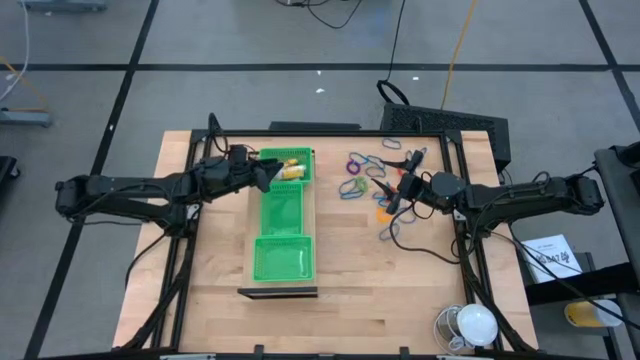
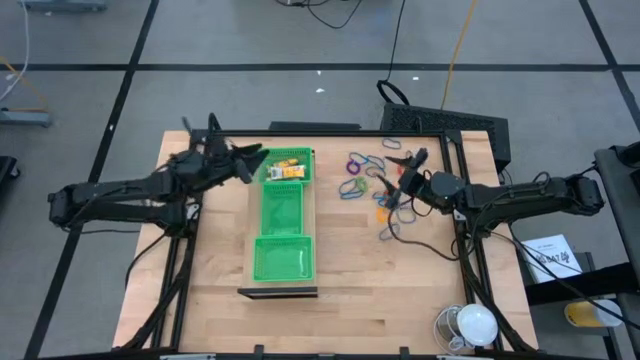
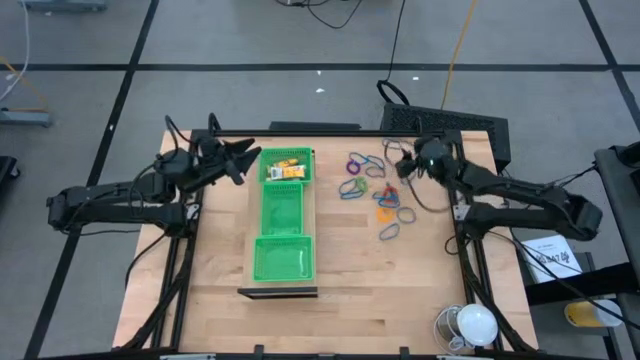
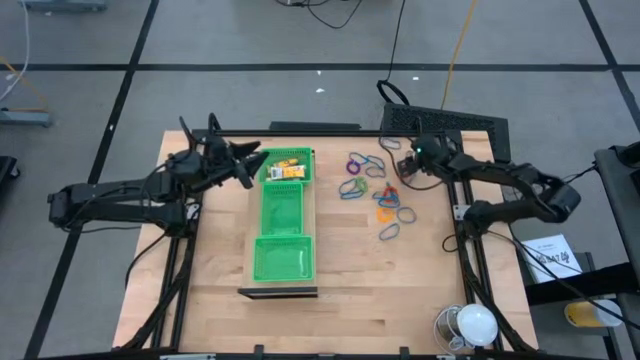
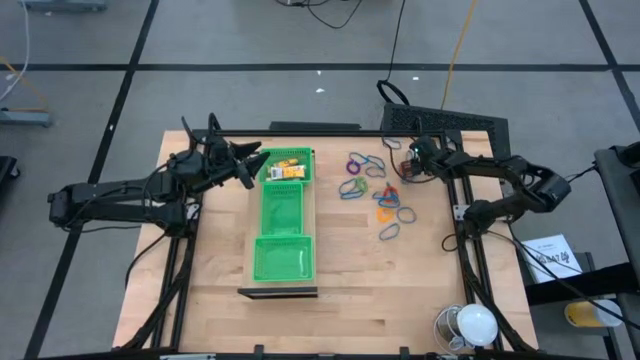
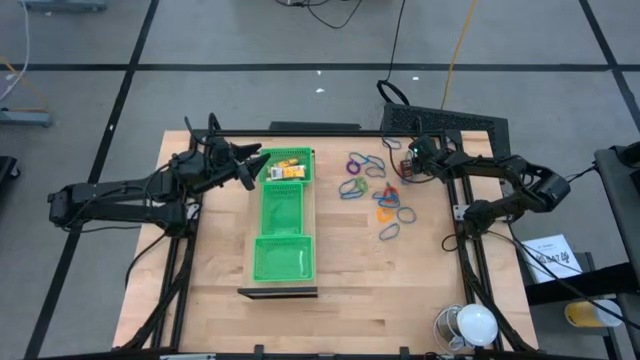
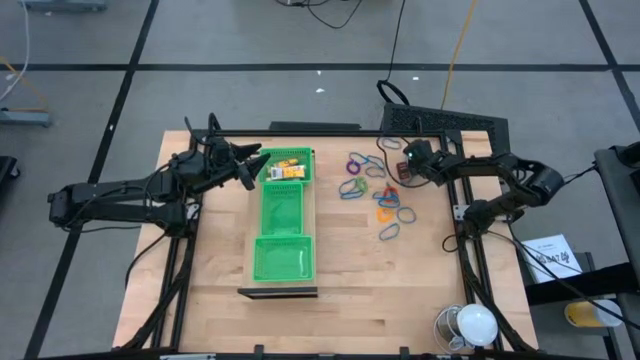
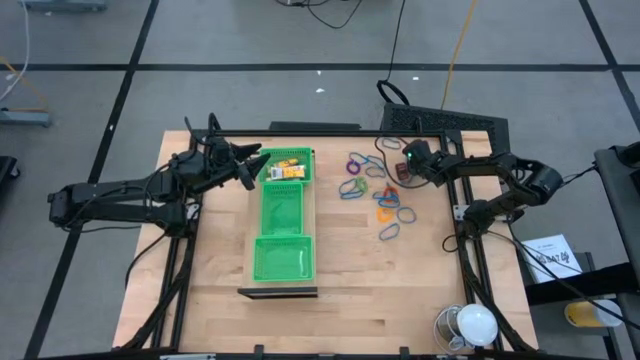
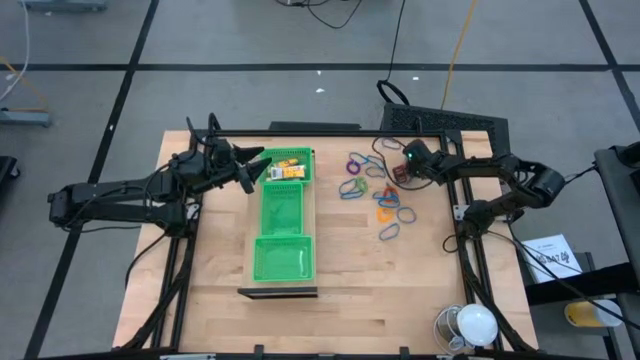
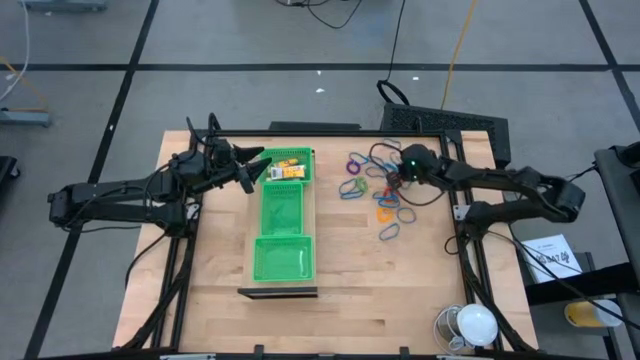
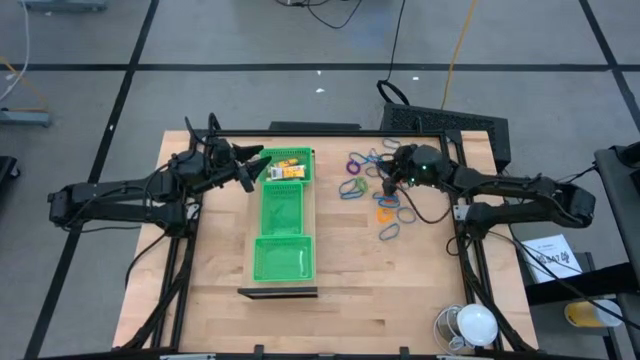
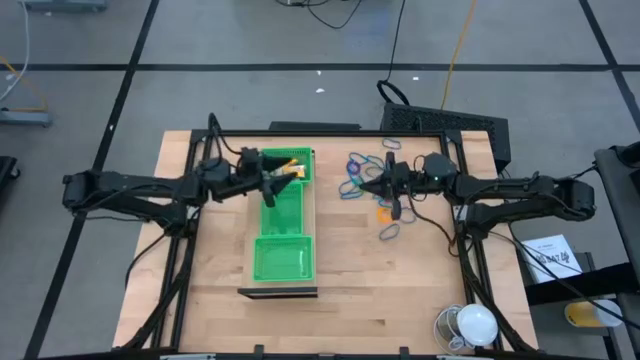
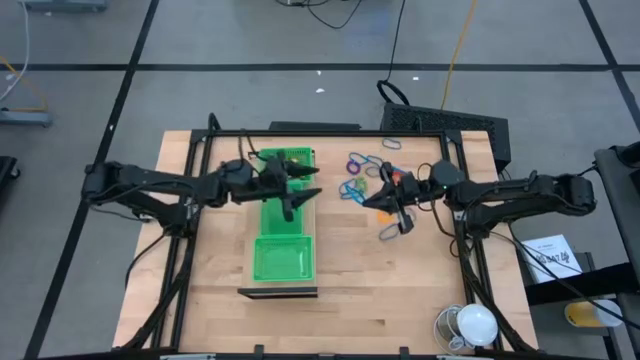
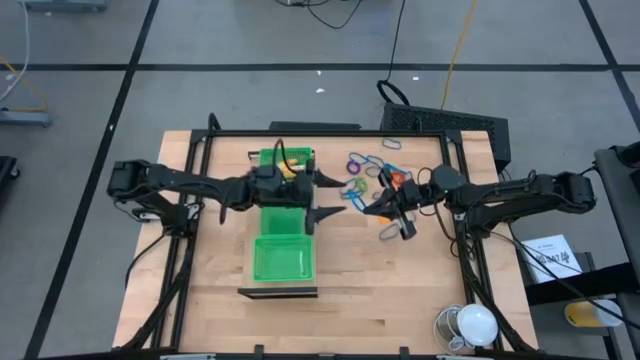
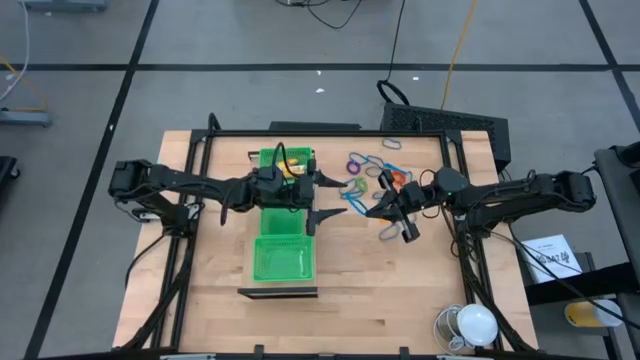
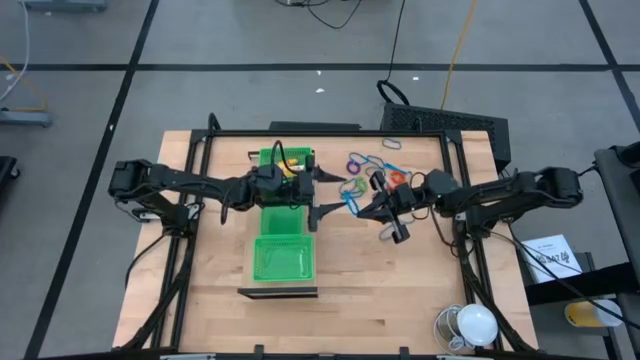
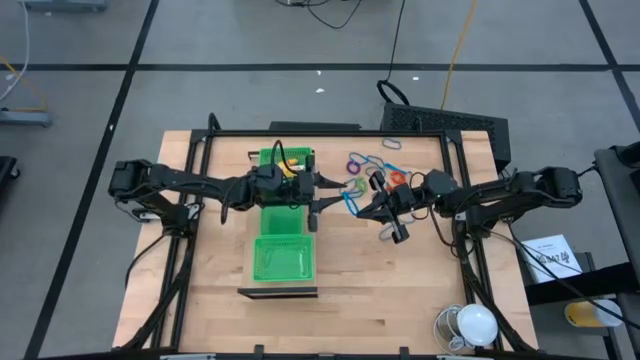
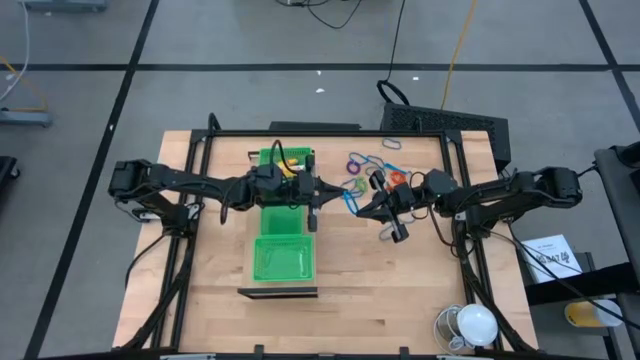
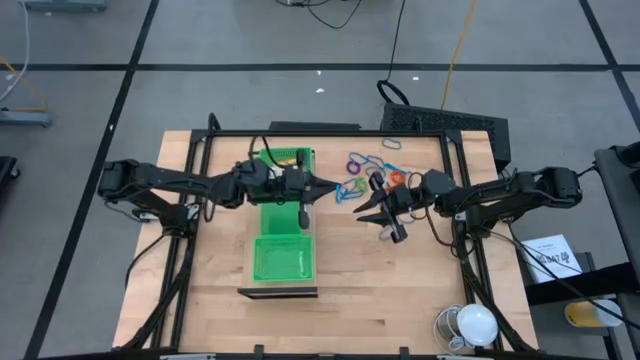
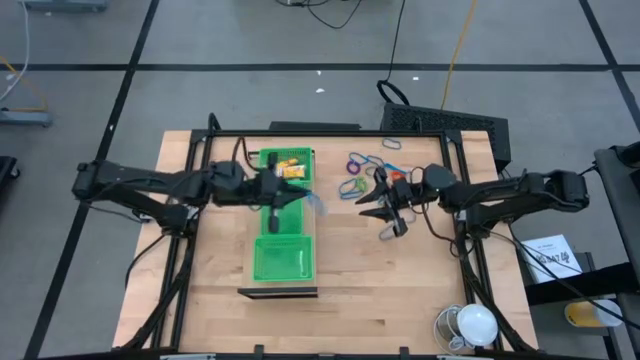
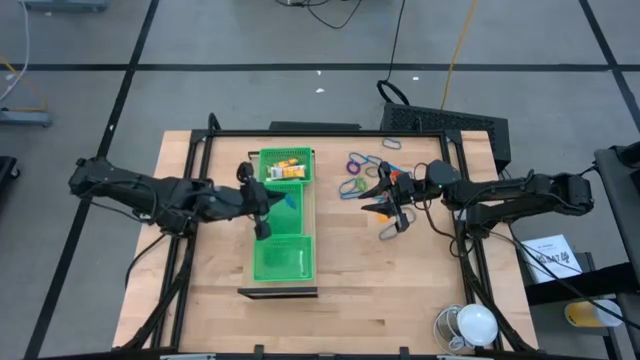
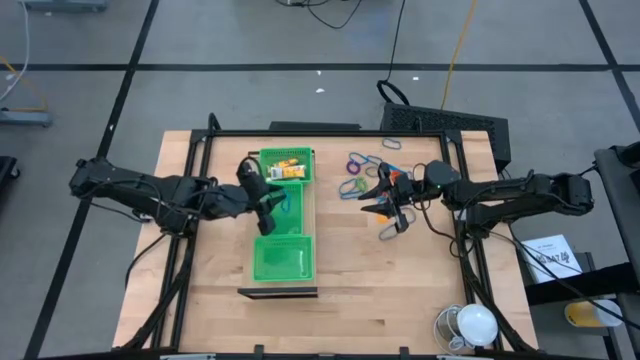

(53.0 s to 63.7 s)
Task: Pick & Place Office Desk Supplies
Put the blue rubber band into the center green bin on the shelf

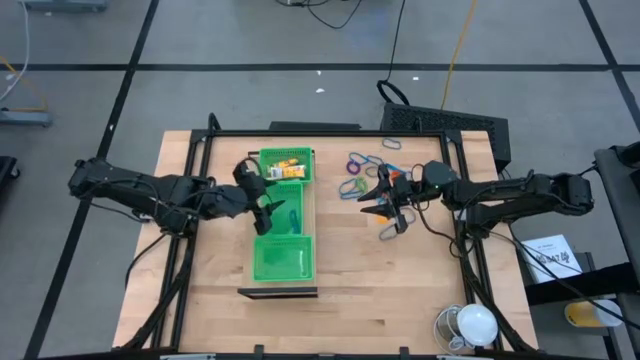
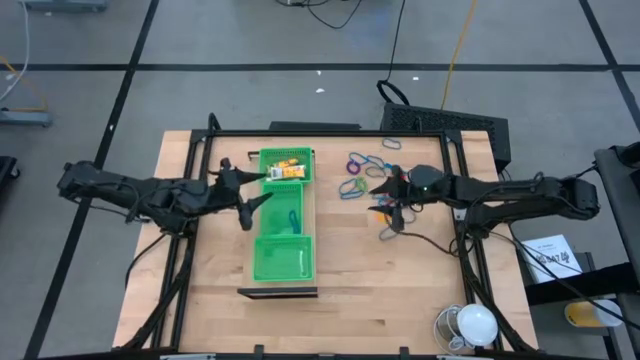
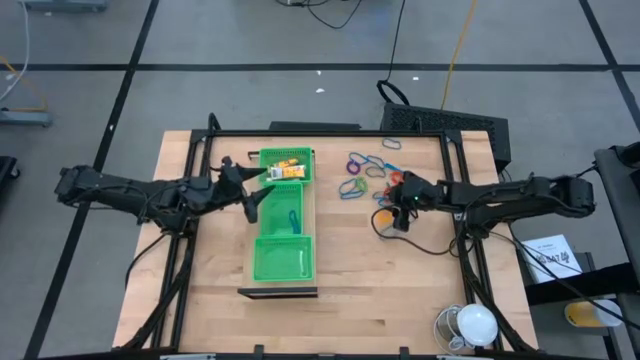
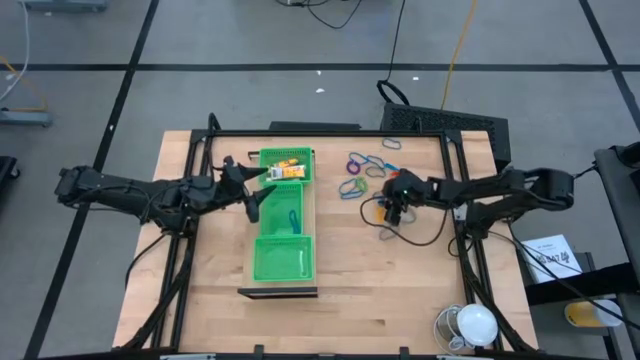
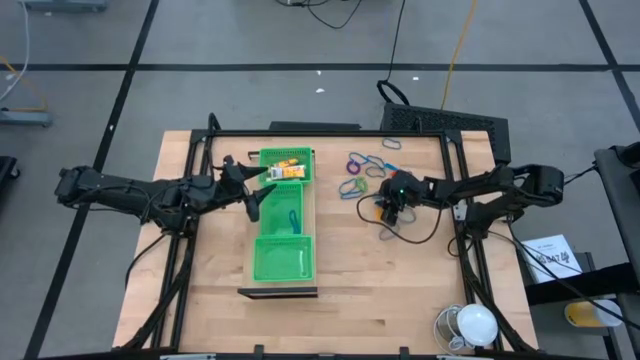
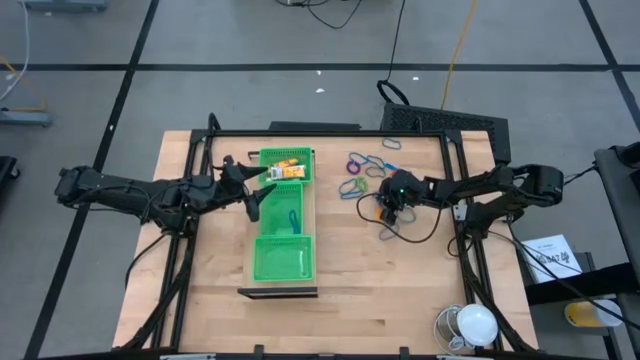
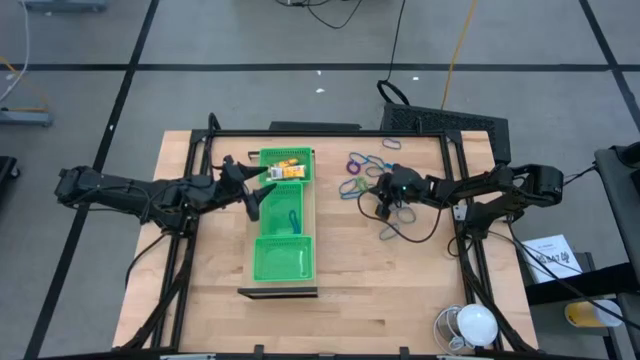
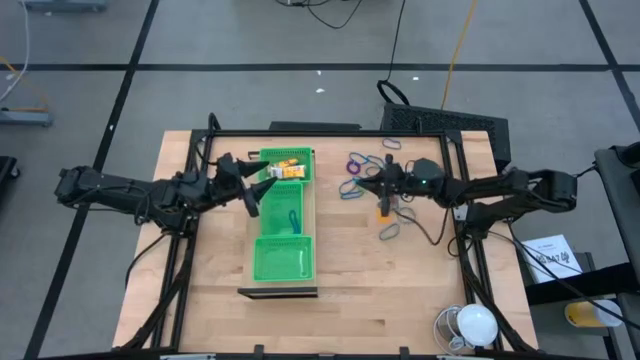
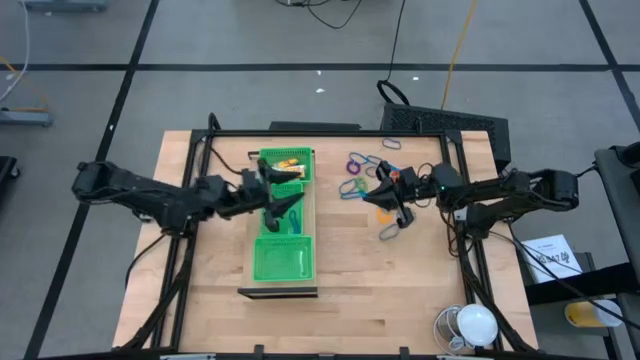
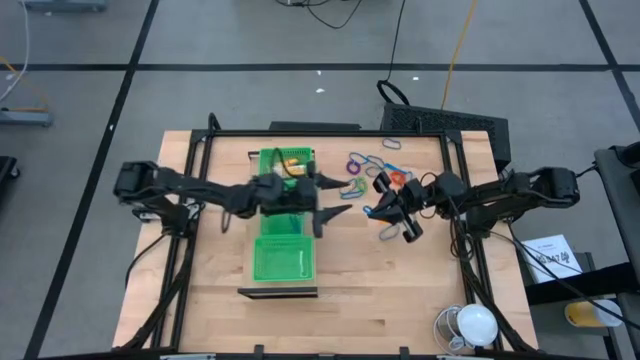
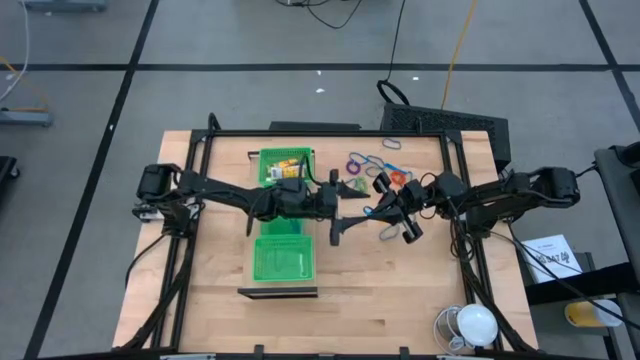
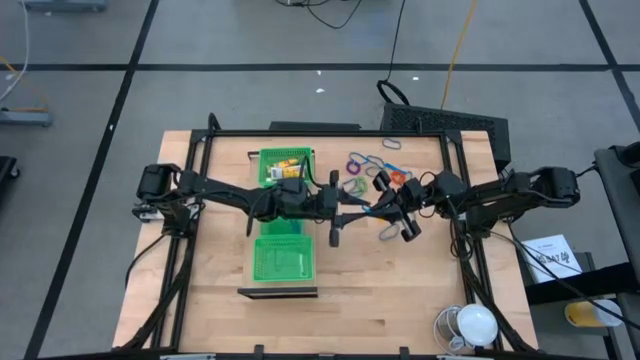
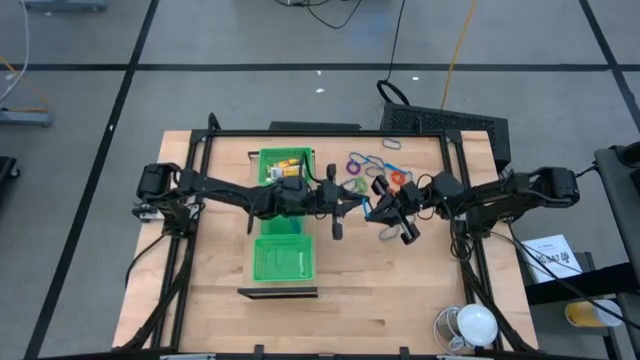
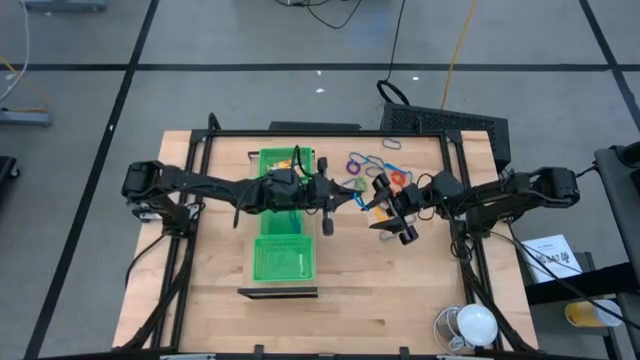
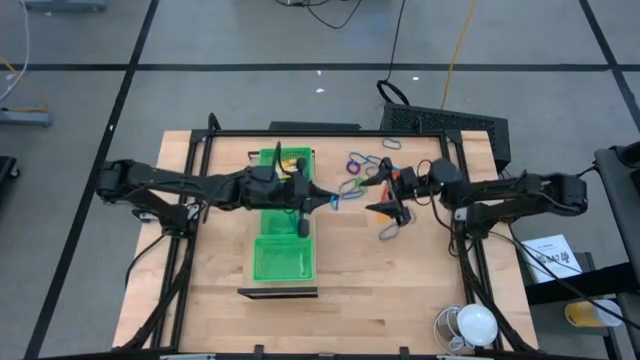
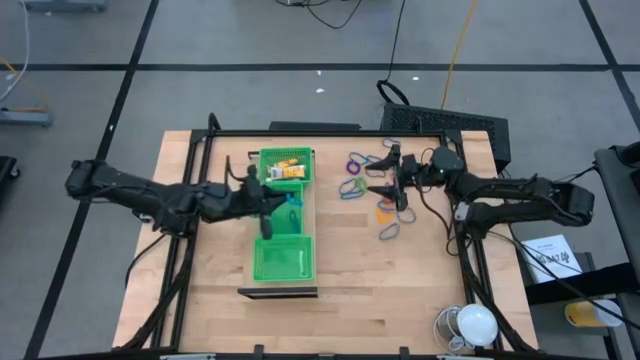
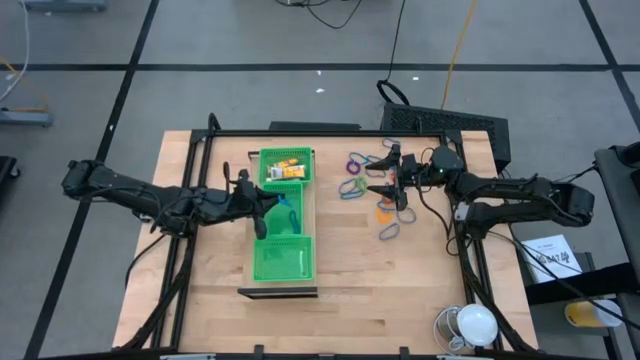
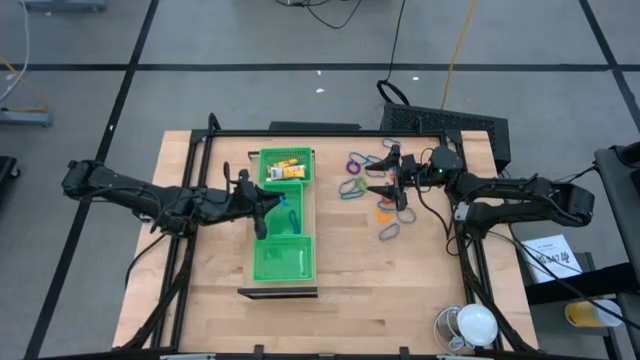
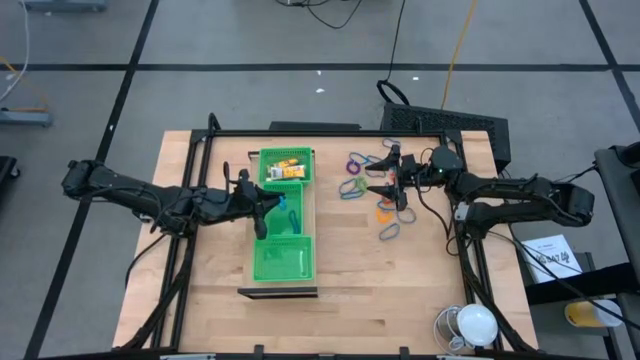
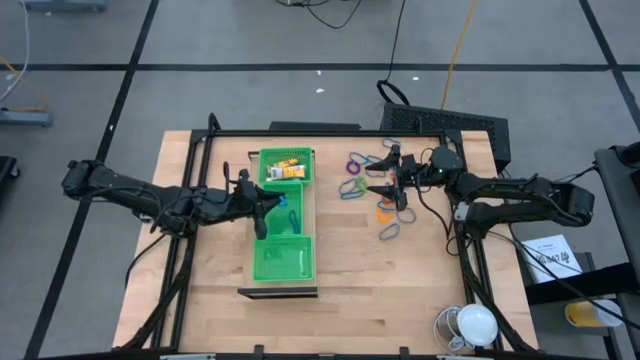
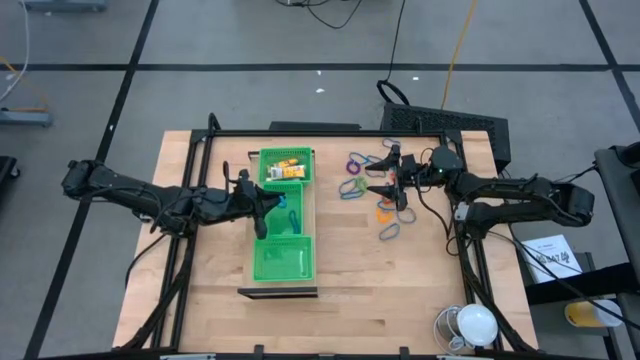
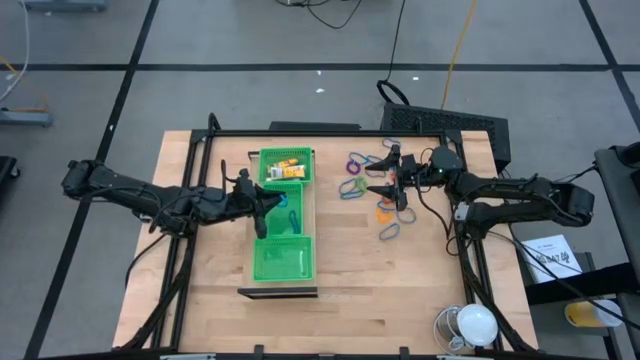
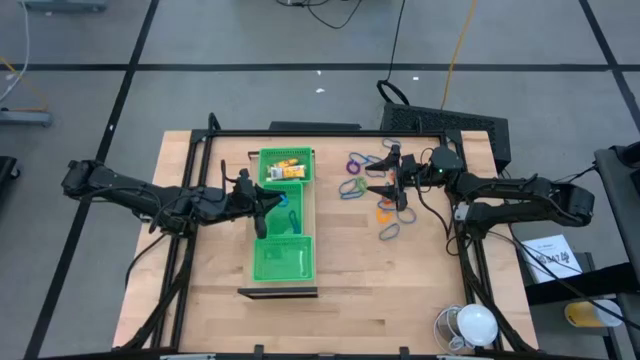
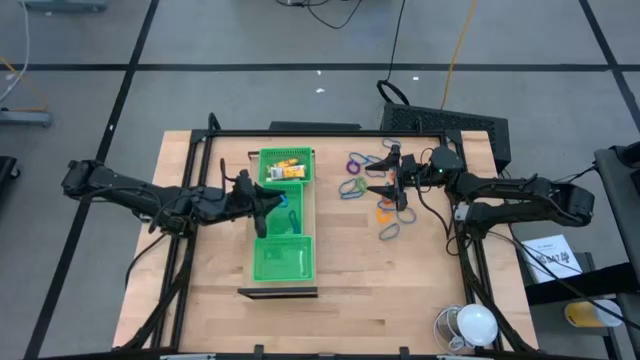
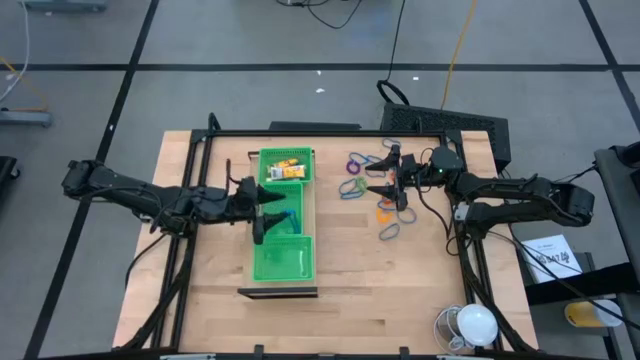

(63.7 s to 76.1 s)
Put the blue rubber band into the center green bin on the shelf
